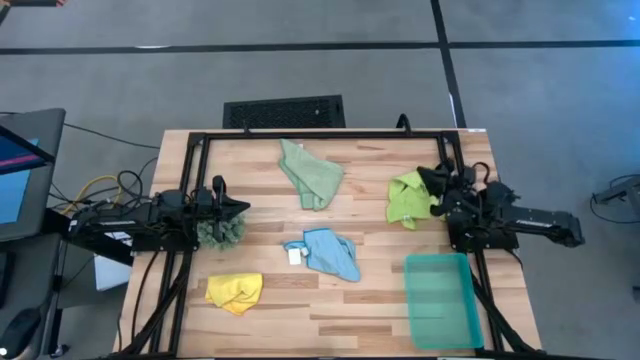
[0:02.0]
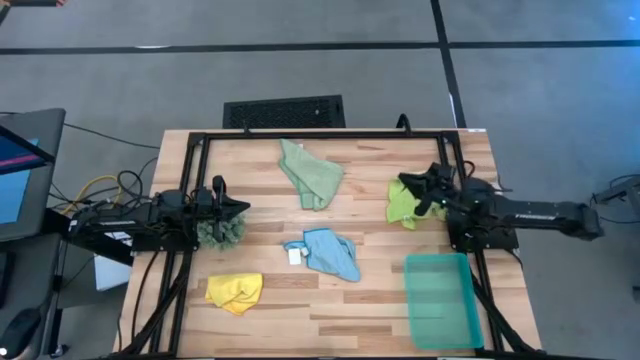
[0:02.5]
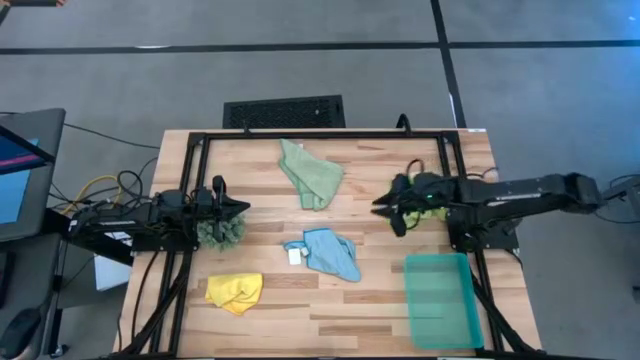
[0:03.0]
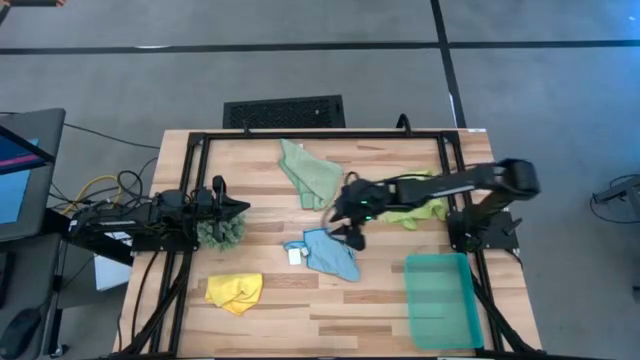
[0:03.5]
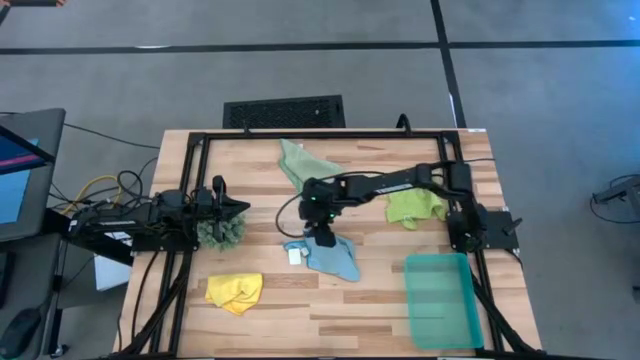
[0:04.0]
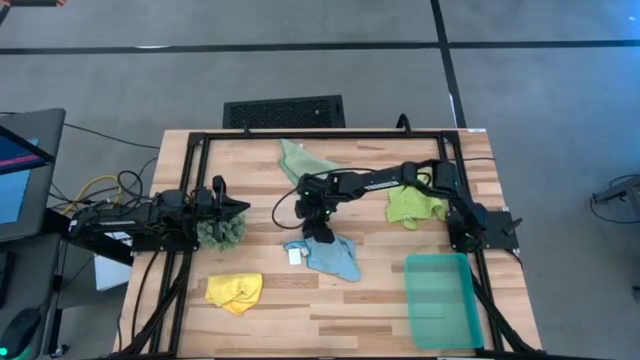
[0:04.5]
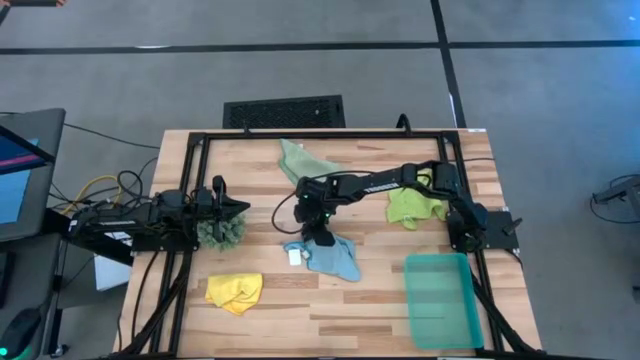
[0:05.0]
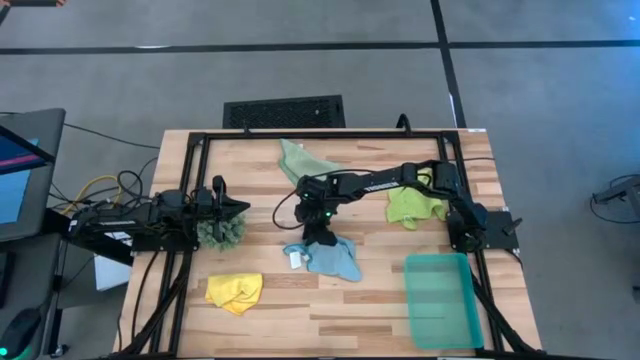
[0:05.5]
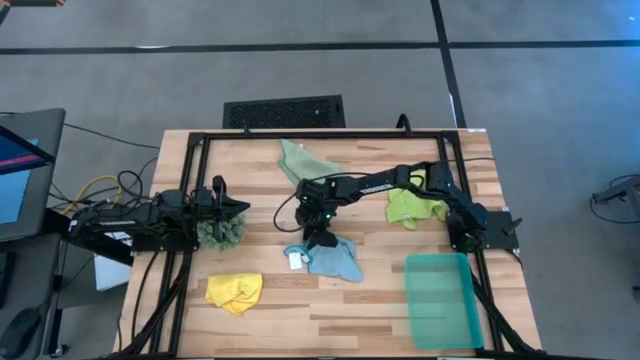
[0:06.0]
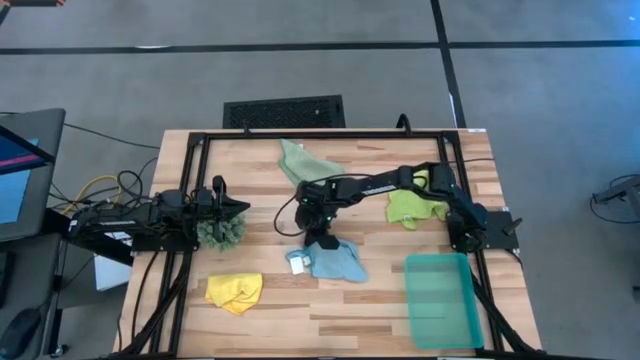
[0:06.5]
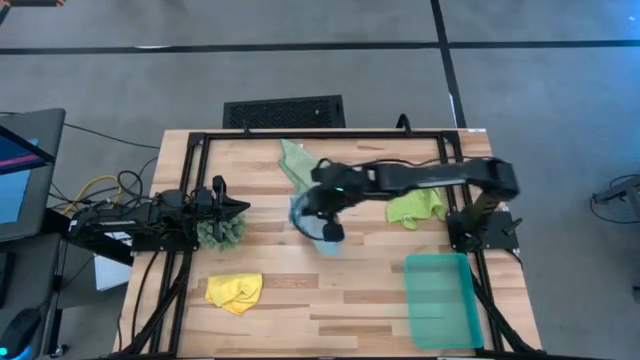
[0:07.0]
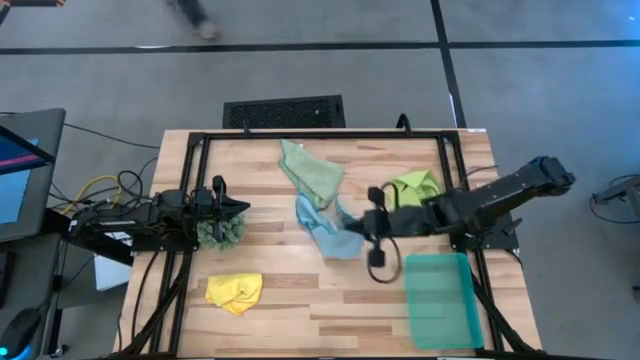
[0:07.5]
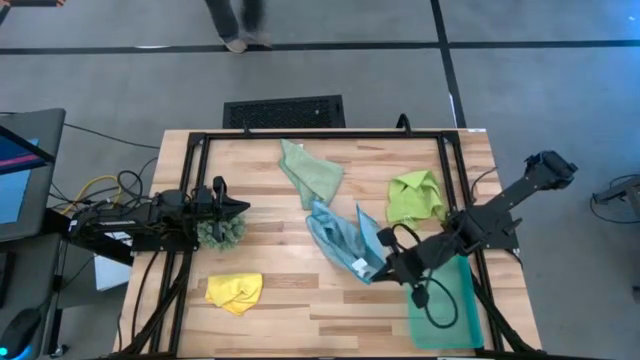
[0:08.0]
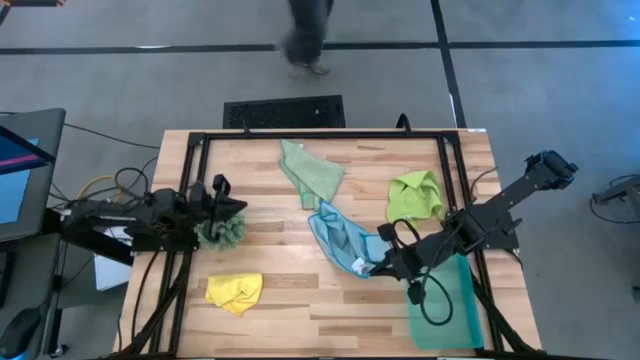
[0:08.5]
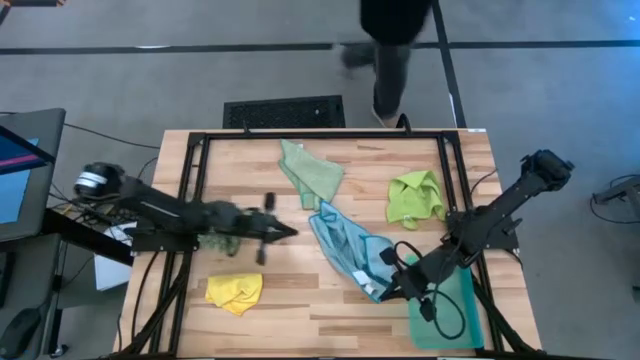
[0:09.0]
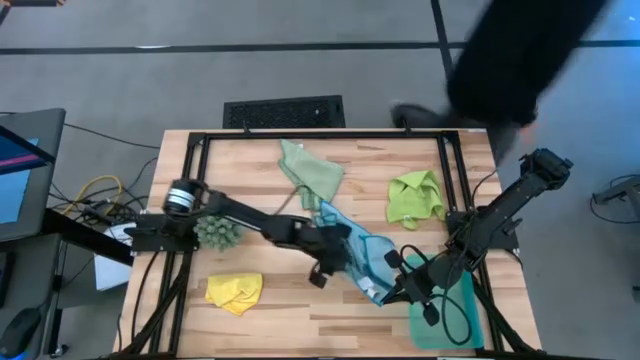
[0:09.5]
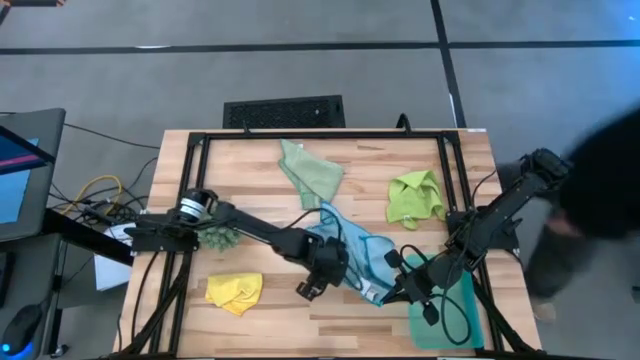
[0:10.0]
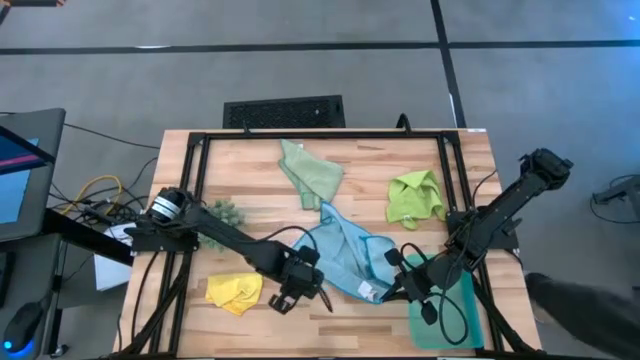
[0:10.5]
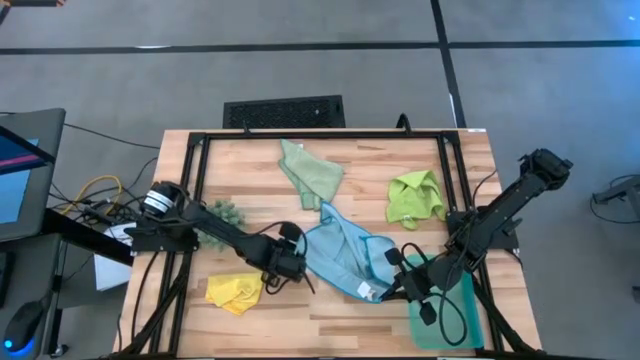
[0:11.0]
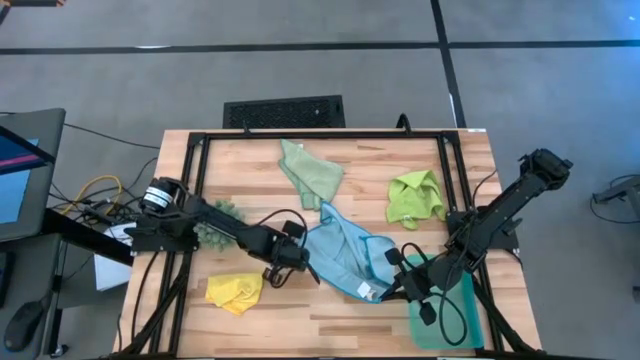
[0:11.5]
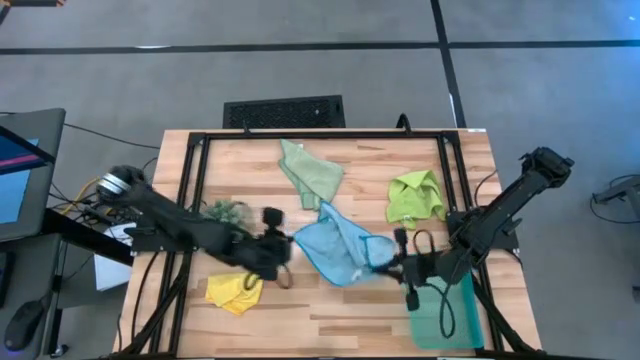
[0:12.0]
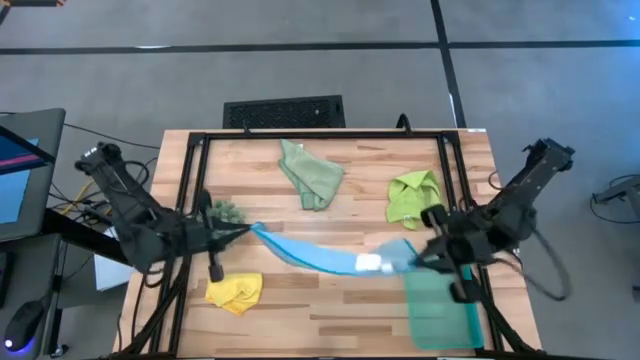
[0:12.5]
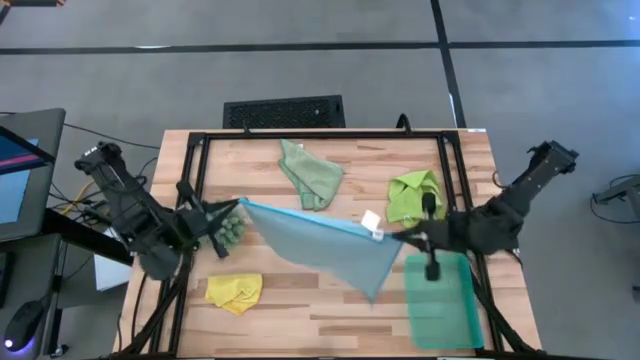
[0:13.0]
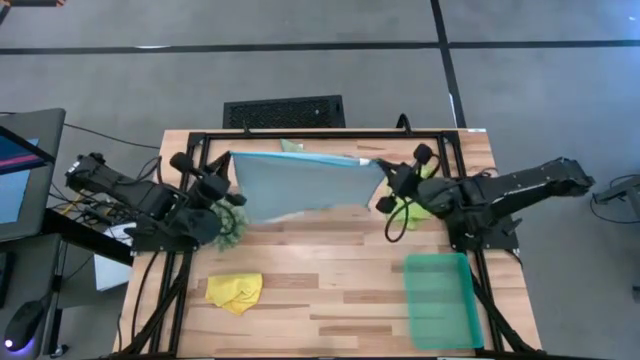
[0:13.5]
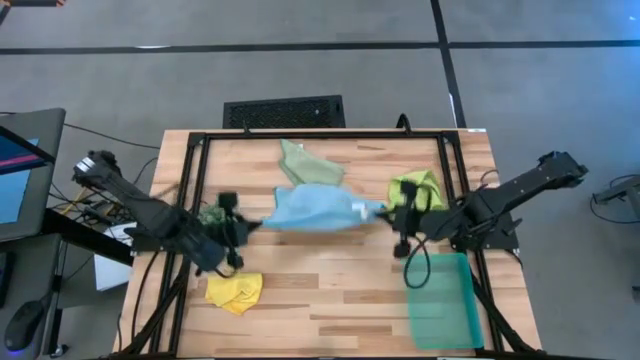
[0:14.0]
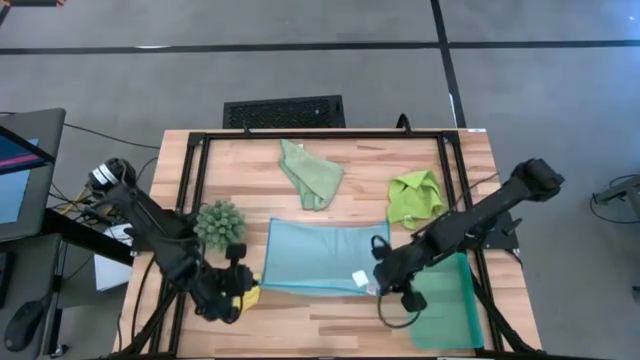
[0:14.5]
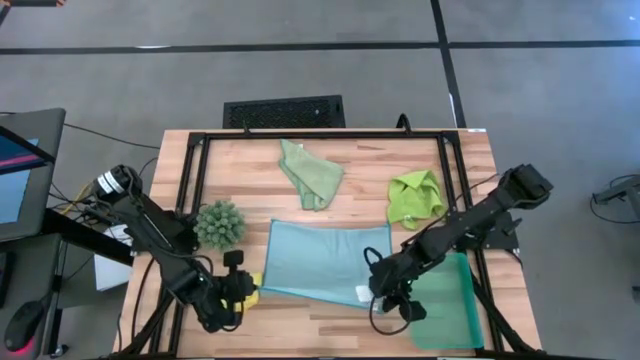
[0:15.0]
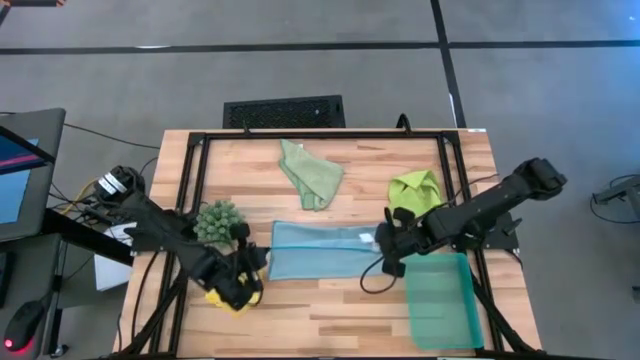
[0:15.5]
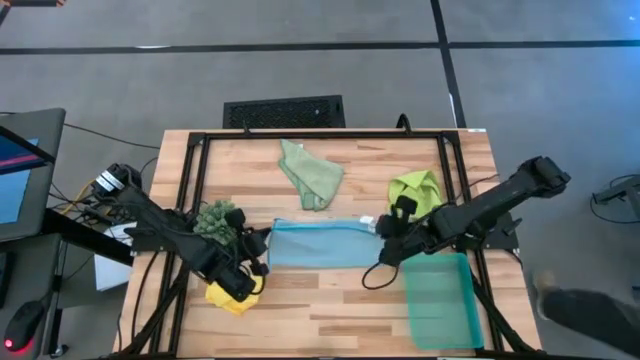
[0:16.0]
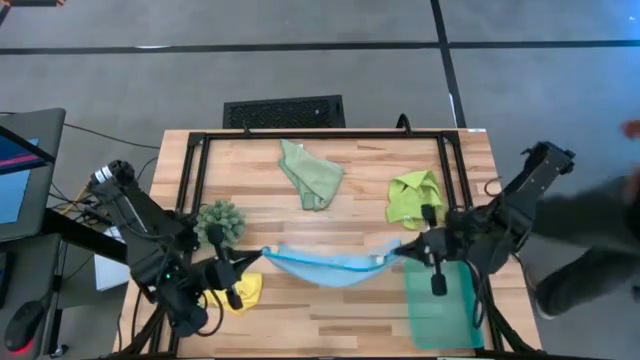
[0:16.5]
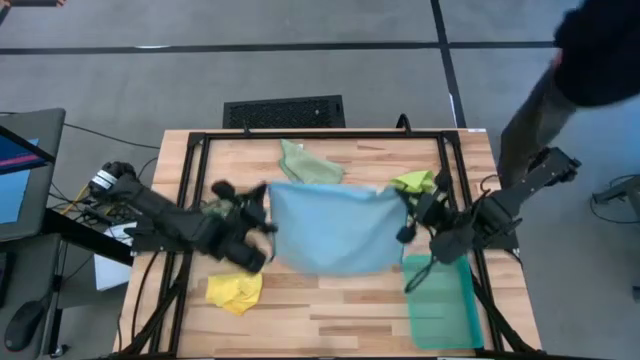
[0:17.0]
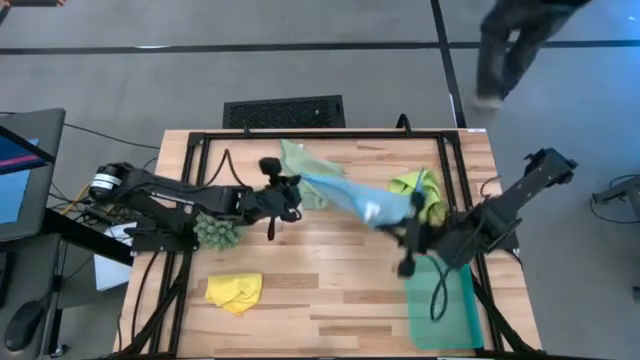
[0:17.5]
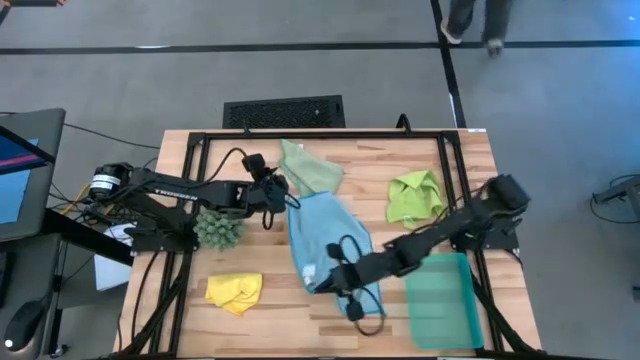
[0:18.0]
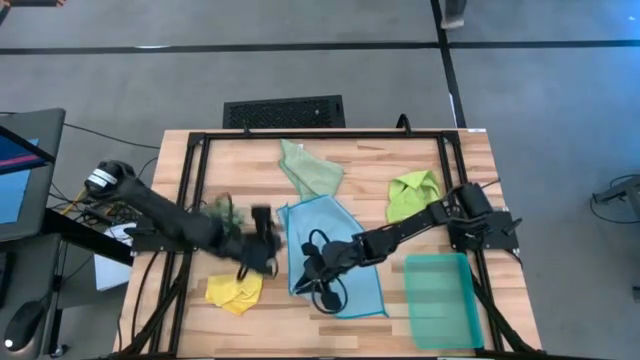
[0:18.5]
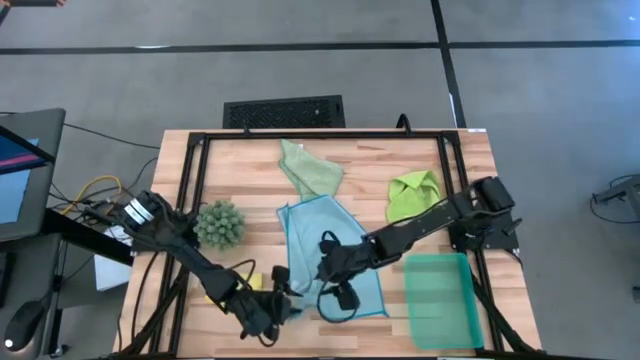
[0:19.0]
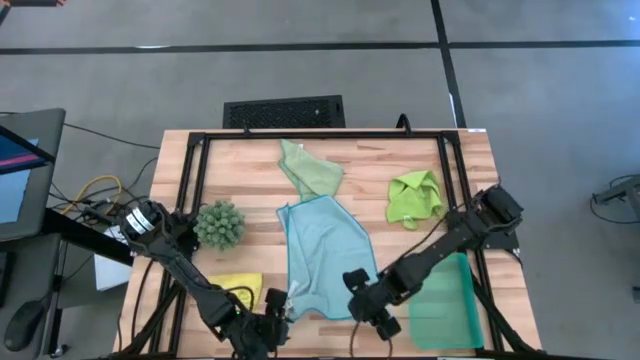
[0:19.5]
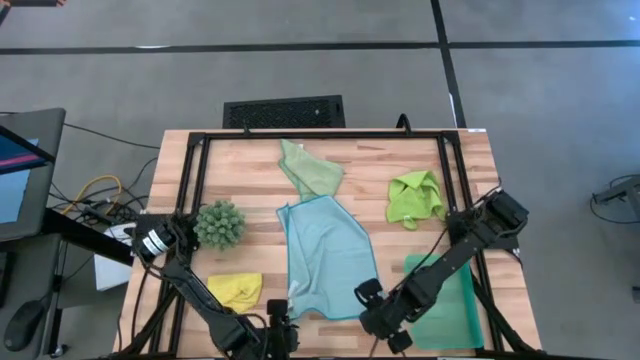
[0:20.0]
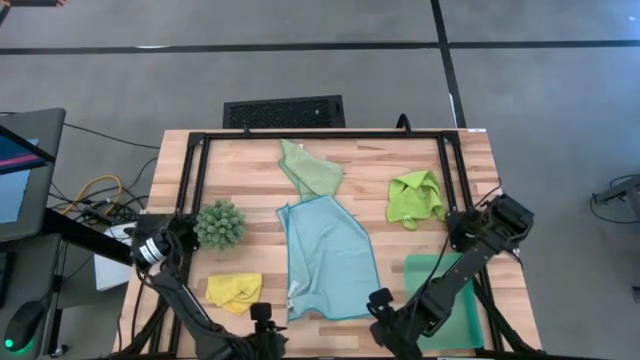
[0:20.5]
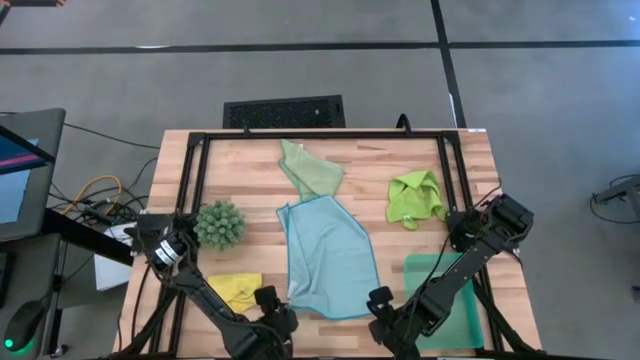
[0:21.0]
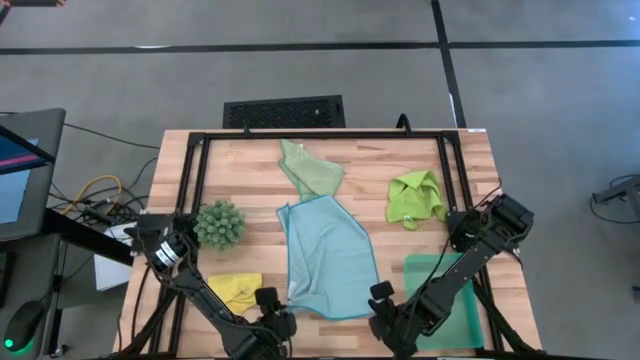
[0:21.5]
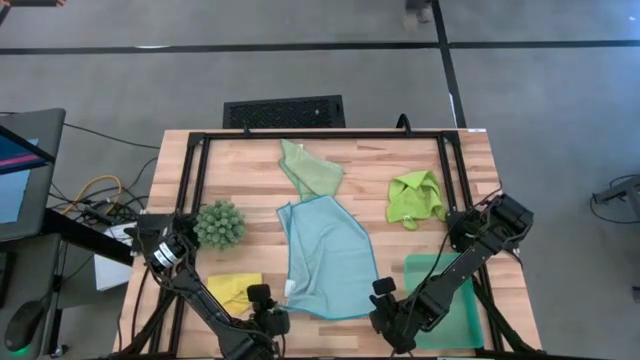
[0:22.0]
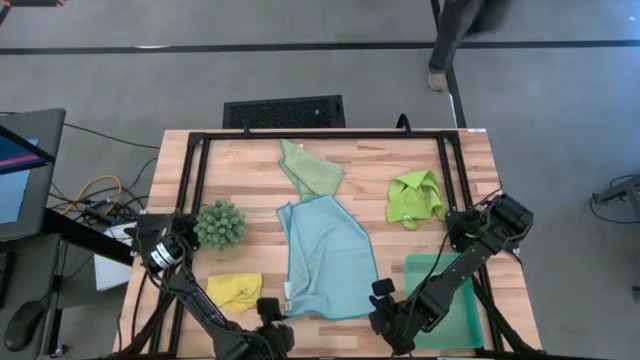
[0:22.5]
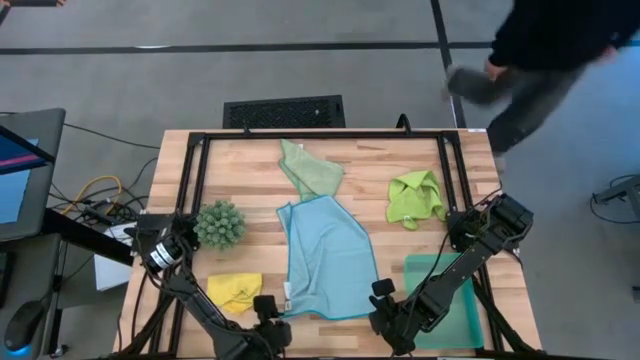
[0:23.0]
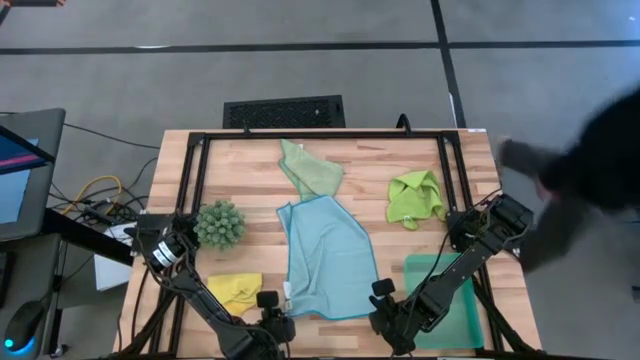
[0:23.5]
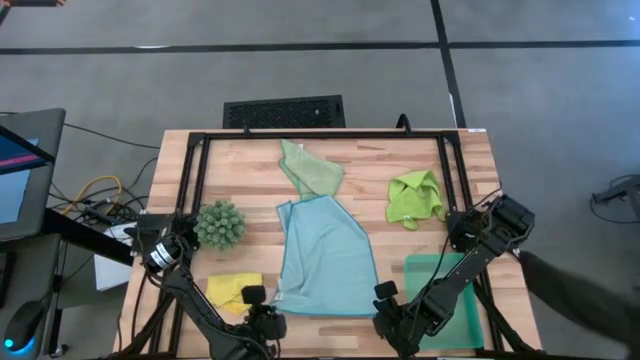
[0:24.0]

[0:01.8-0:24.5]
Task: Fold microfiber towels
Fold the blue microfiber cloth
